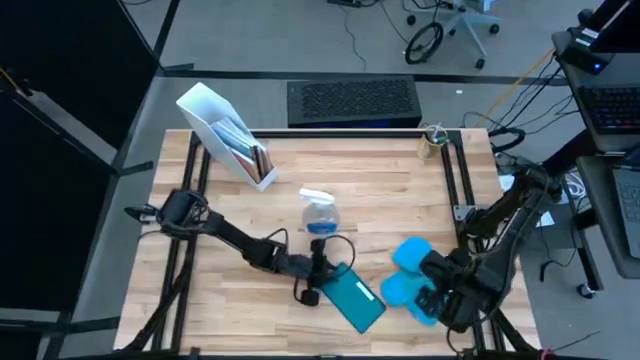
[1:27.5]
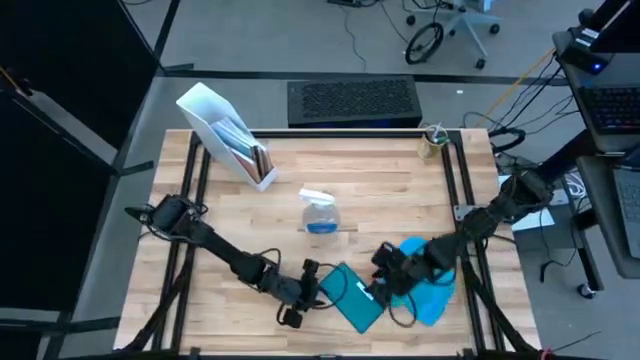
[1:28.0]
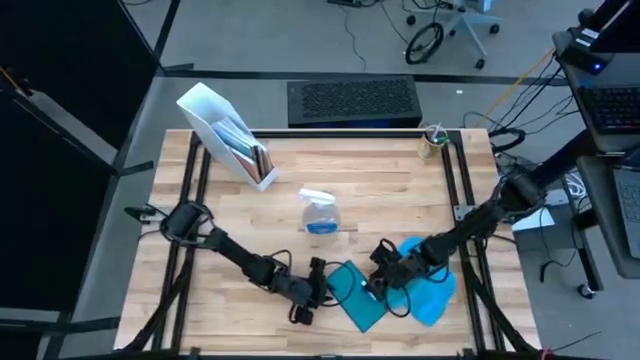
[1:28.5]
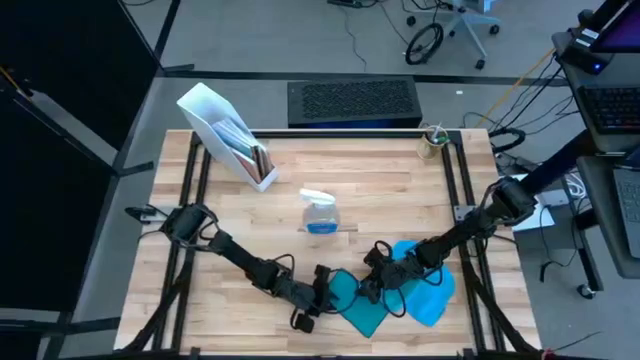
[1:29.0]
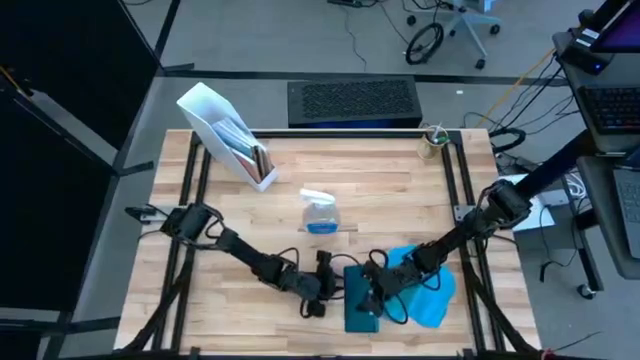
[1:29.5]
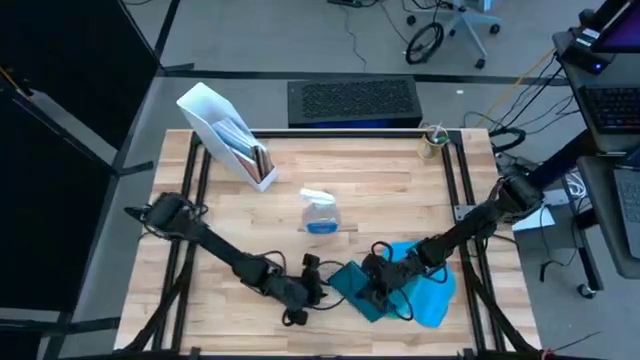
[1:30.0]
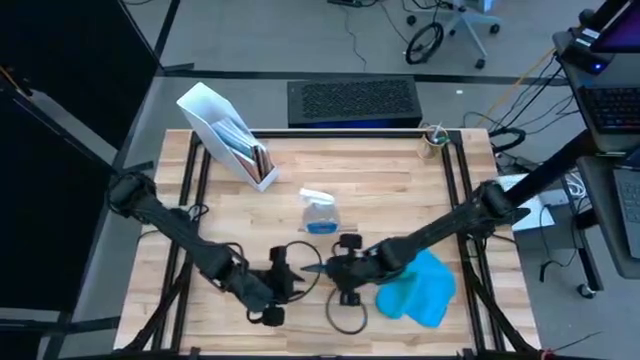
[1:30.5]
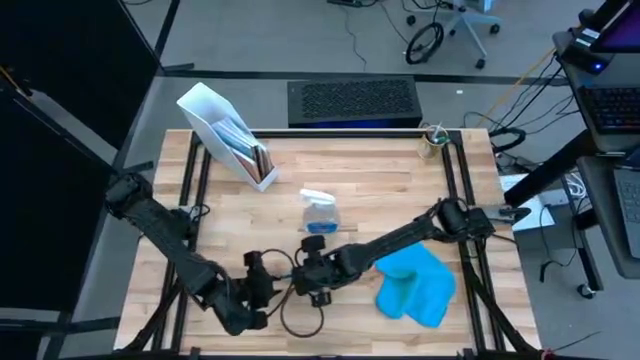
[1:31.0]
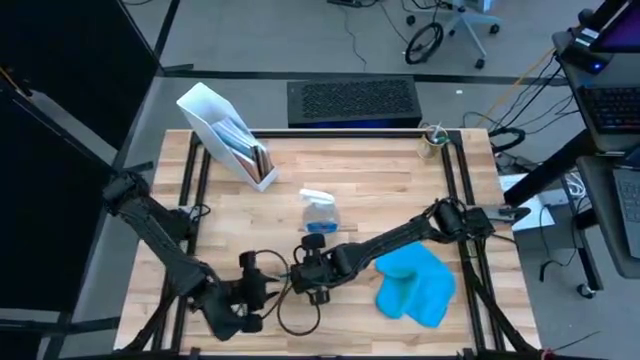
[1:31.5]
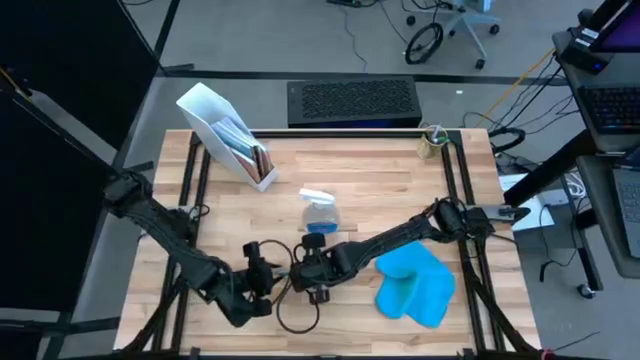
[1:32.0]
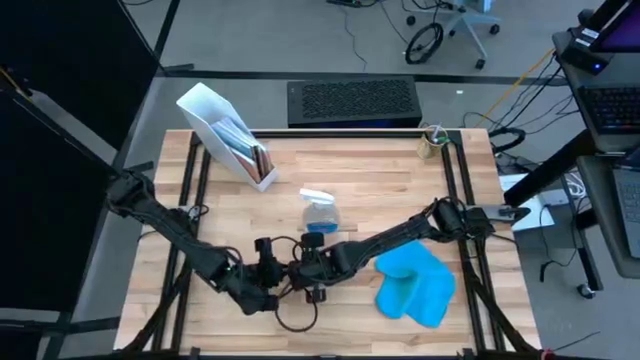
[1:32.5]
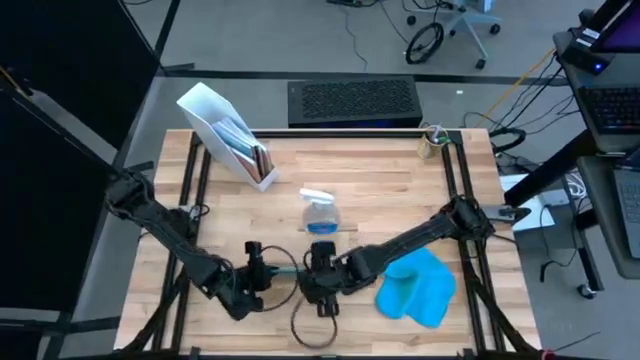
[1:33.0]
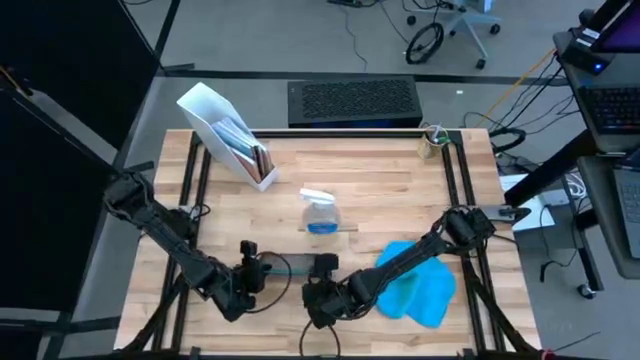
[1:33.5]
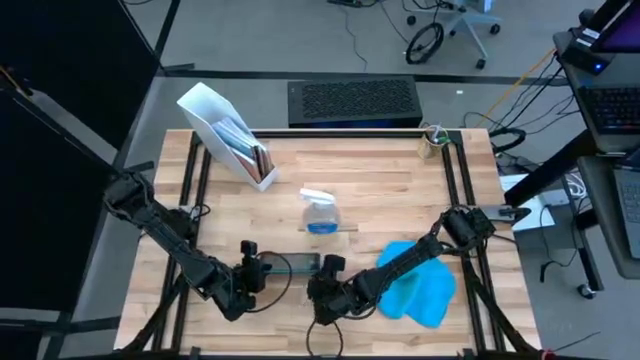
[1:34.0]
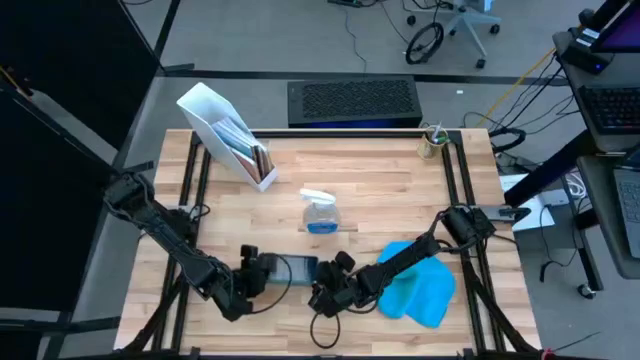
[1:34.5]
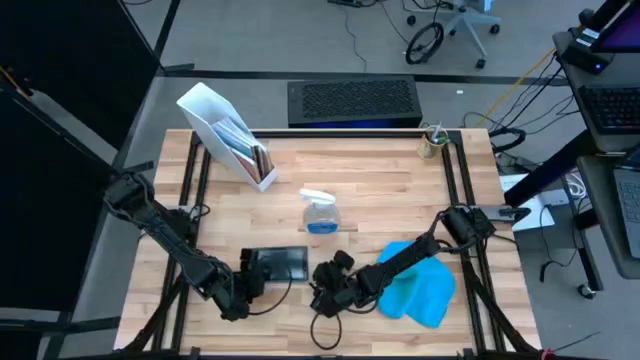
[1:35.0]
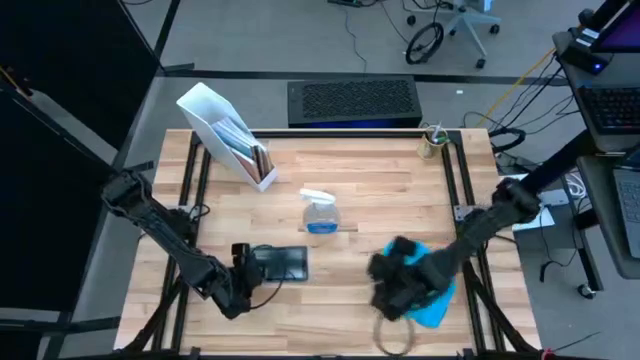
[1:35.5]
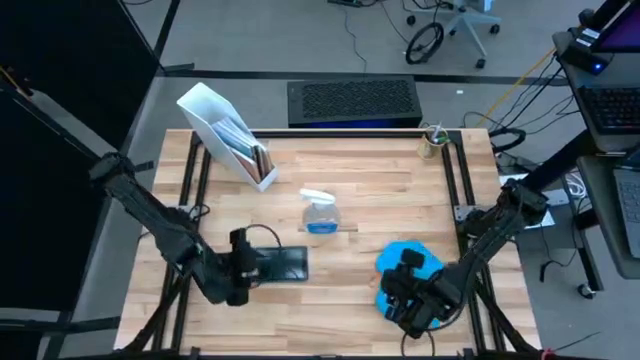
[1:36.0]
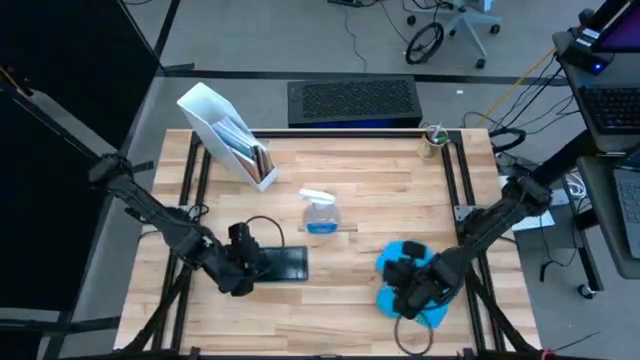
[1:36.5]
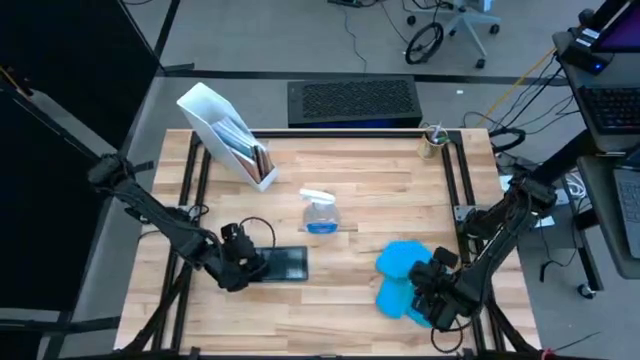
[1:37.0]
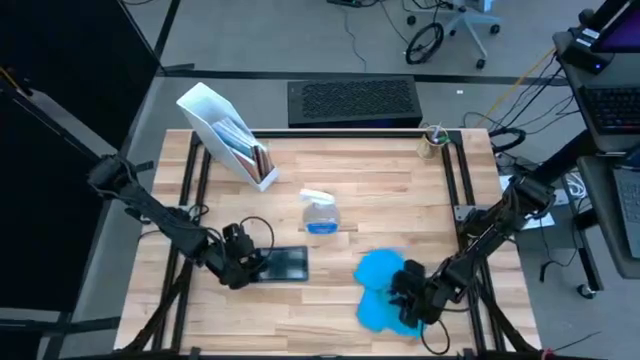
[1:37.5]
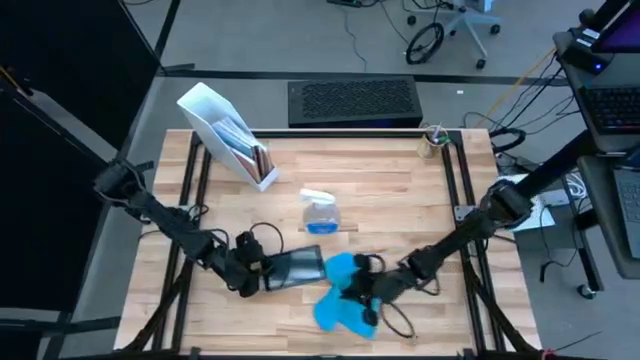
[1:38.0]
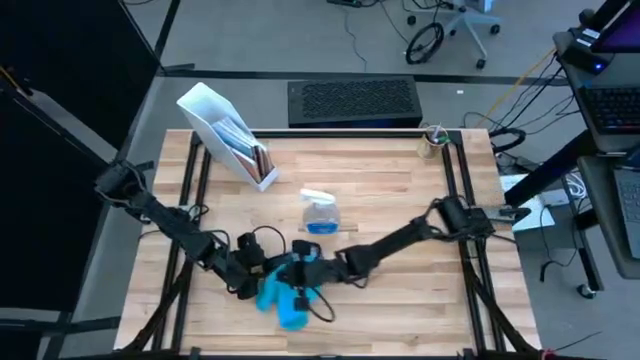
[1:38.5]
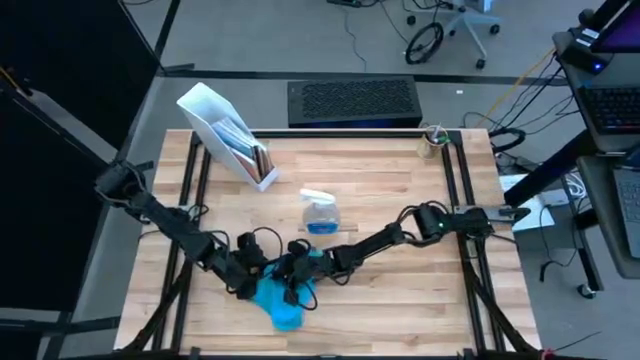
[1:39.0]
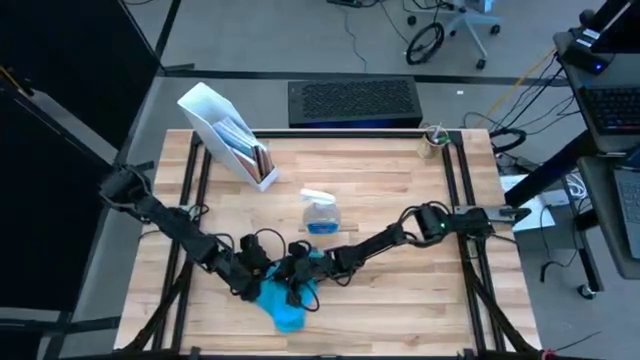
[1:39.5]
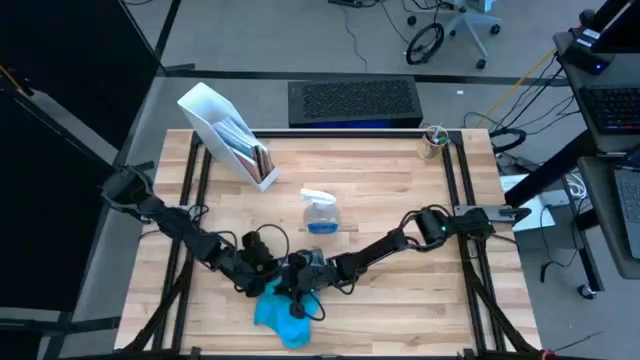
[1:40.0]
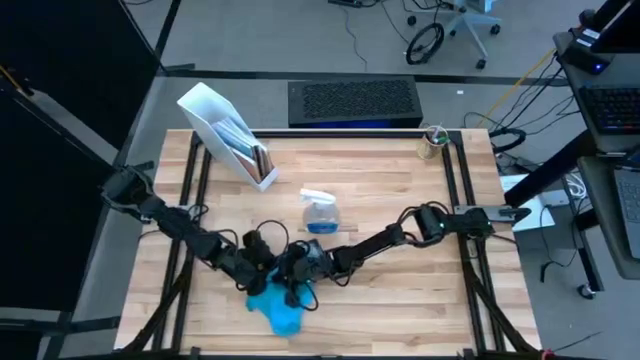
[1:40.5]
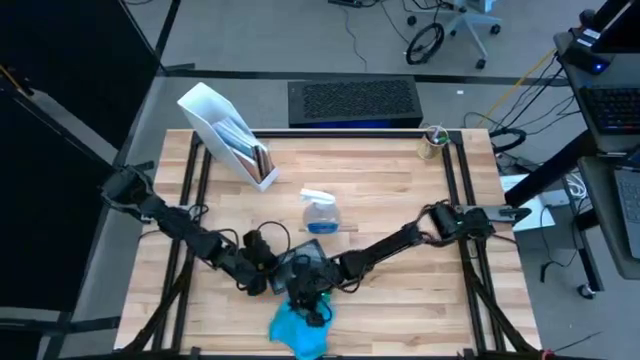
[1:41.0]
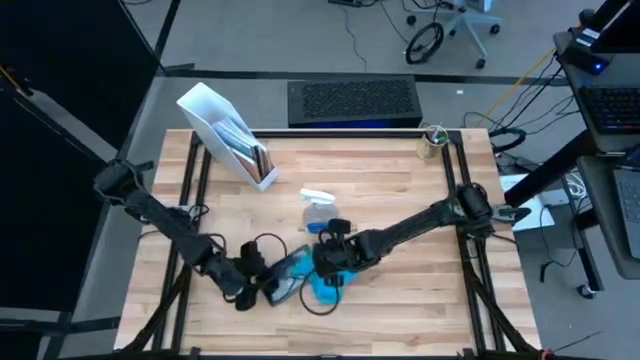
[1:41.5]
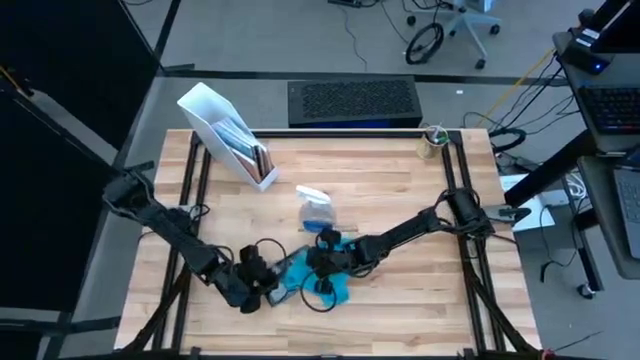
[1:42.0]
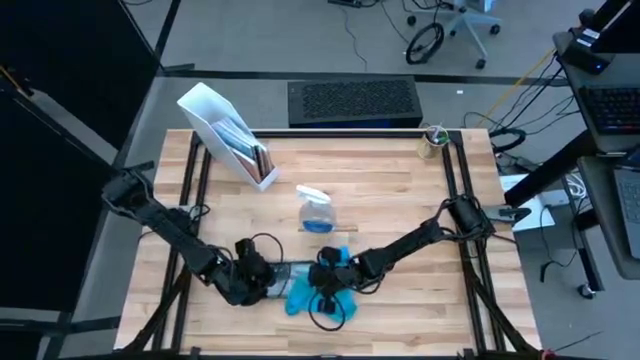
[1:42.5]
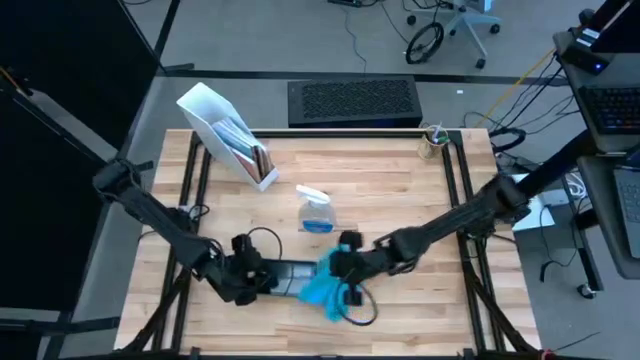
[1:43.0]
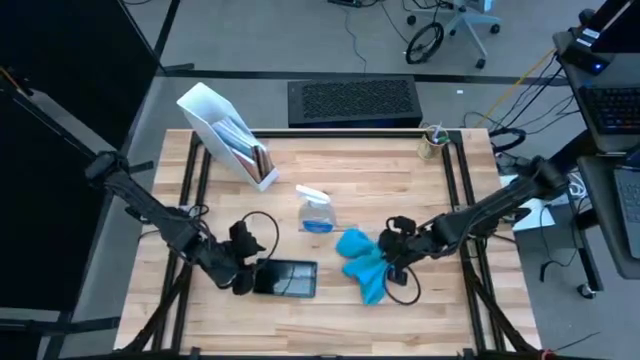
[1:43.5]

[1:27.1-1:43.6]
Task: Apply microfiber cloth
Wipe the screen of the blue tablet with the blue microfiber cloth

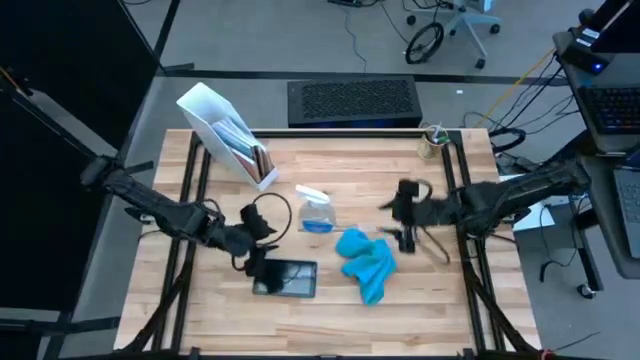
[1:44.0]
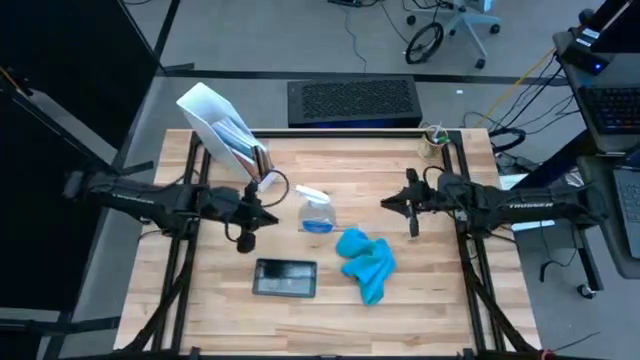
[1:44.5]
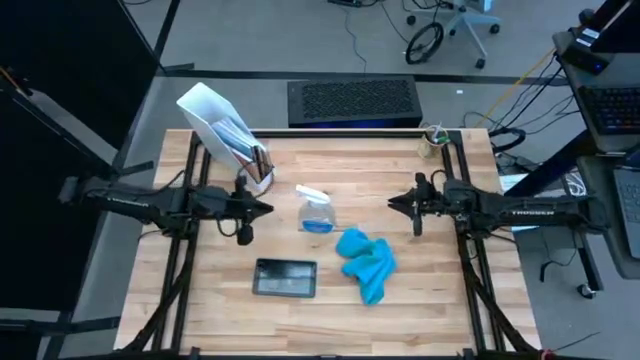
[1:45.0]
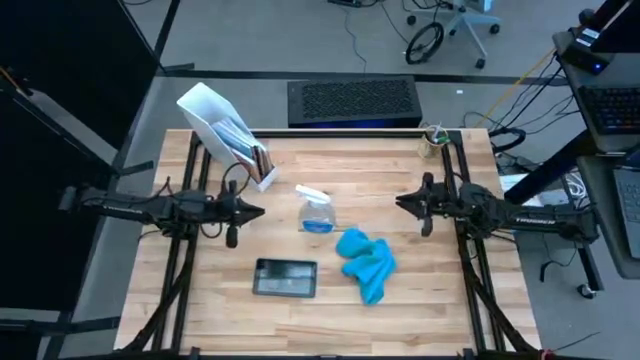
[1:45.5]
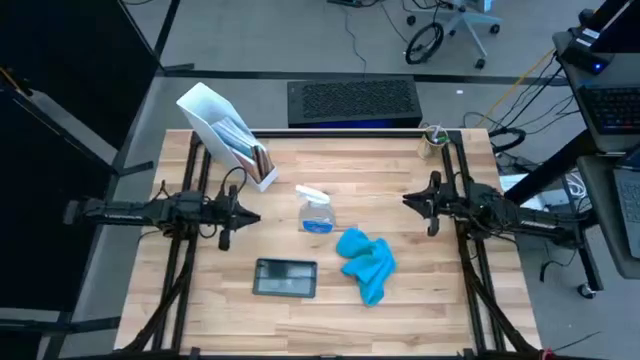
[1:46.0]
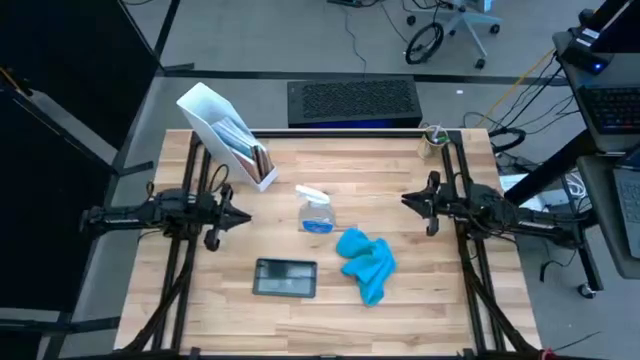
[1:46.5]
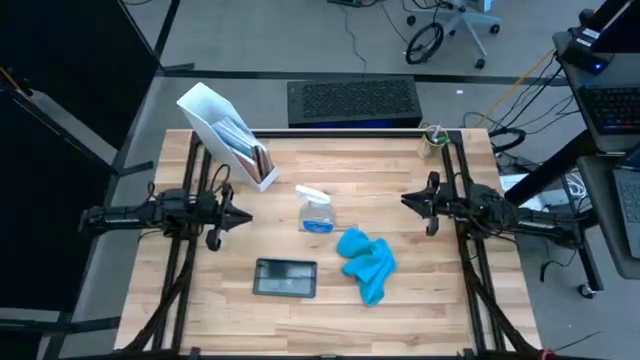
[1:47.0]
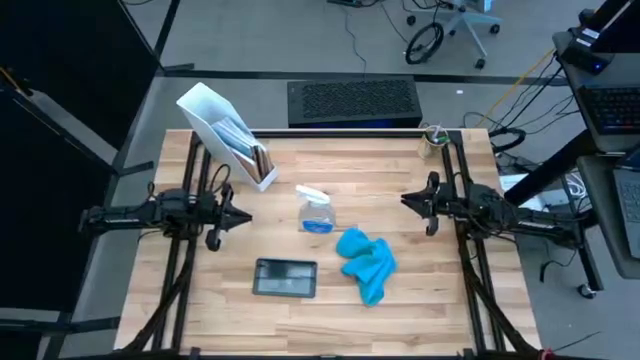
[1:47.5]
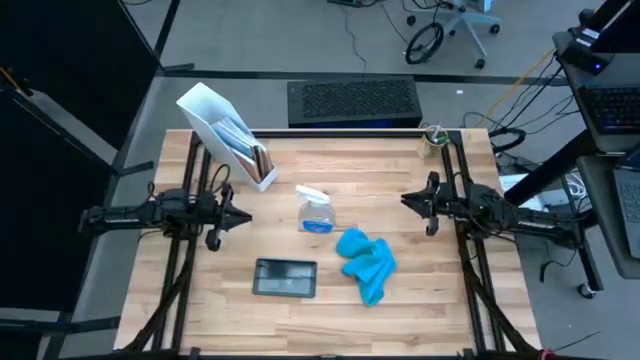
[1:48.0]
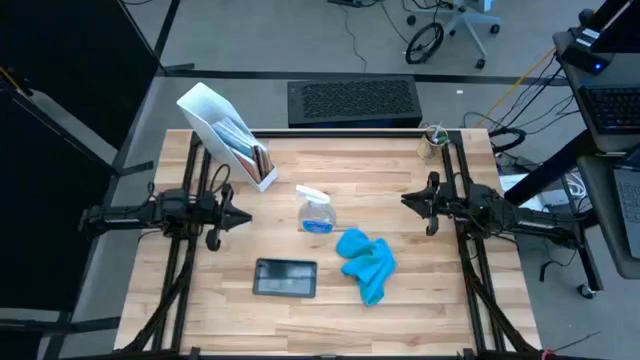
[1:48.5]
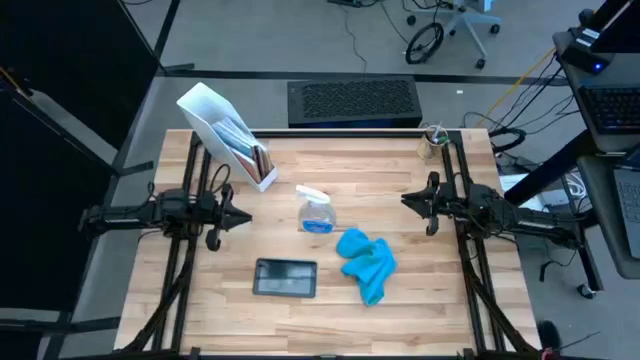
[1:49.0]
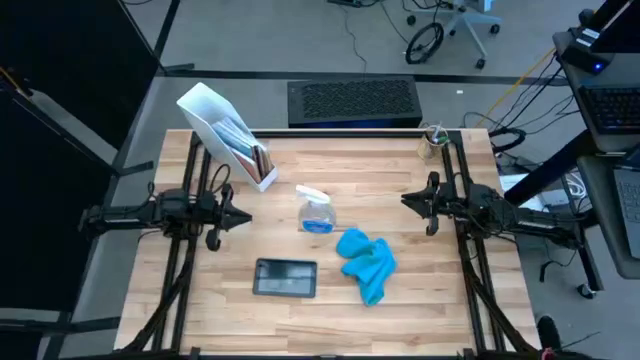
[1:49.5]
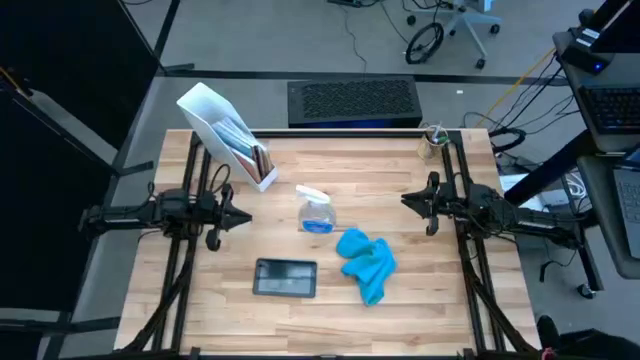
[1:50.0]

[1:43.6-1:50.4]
Return to Home Position
